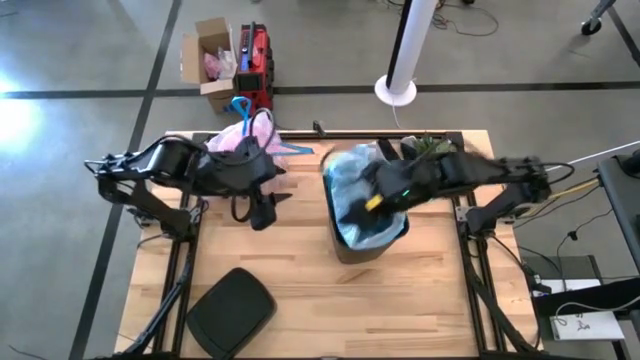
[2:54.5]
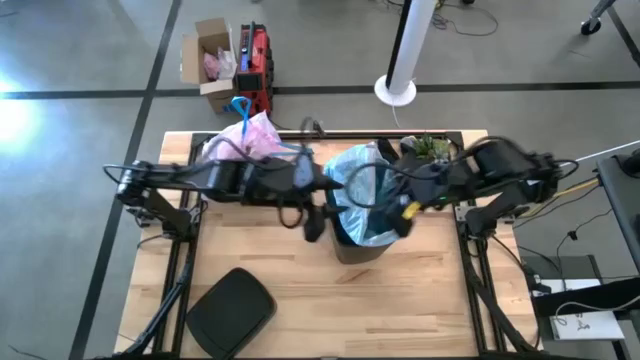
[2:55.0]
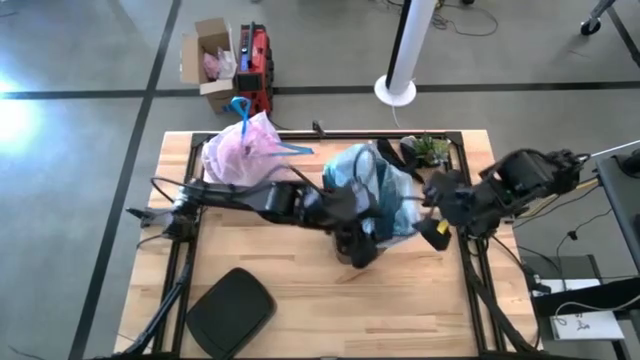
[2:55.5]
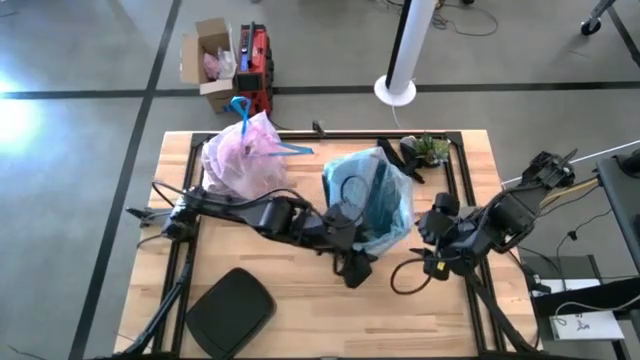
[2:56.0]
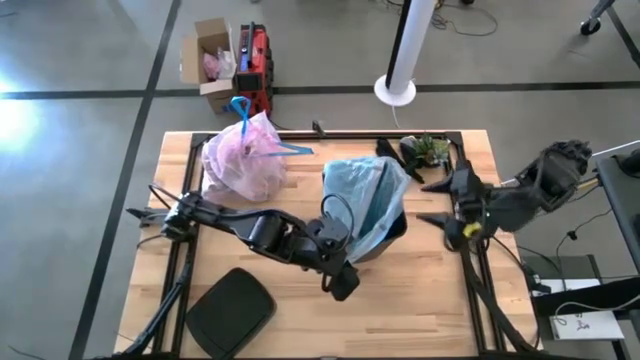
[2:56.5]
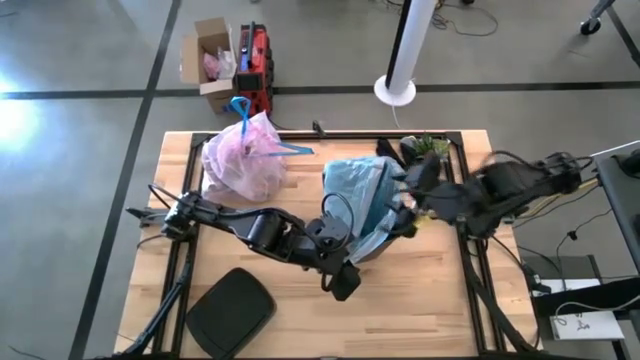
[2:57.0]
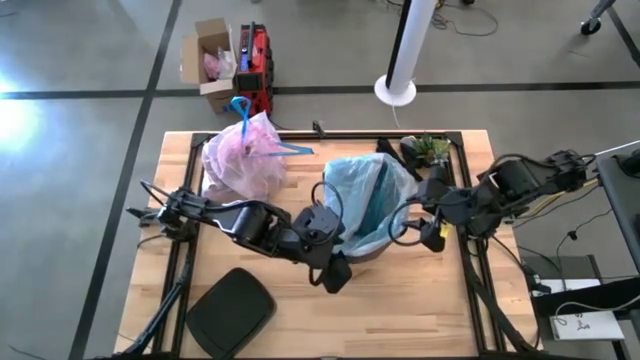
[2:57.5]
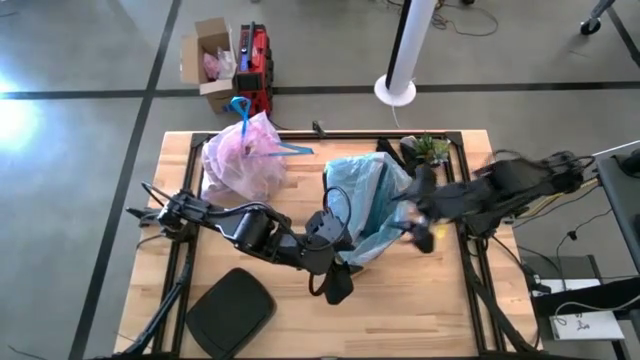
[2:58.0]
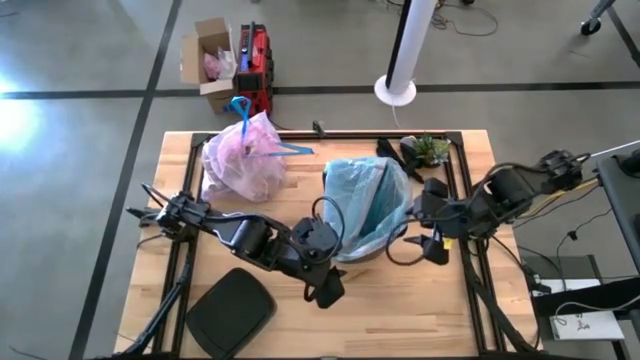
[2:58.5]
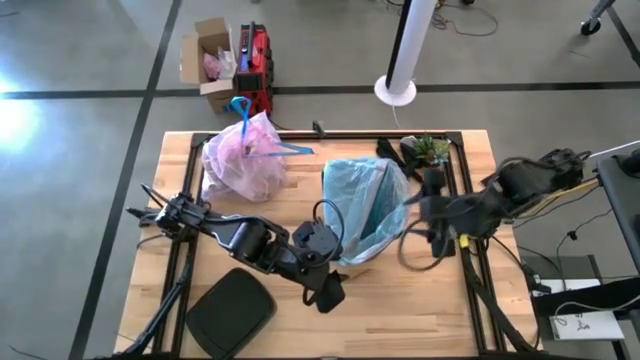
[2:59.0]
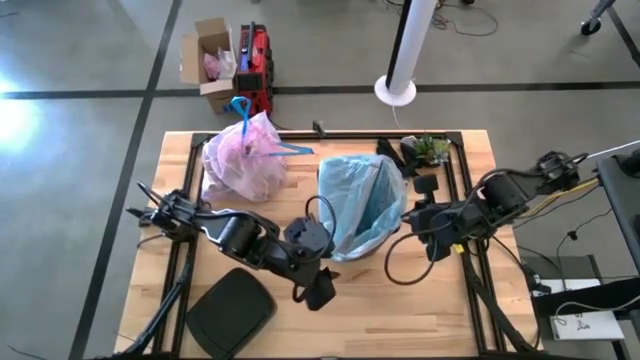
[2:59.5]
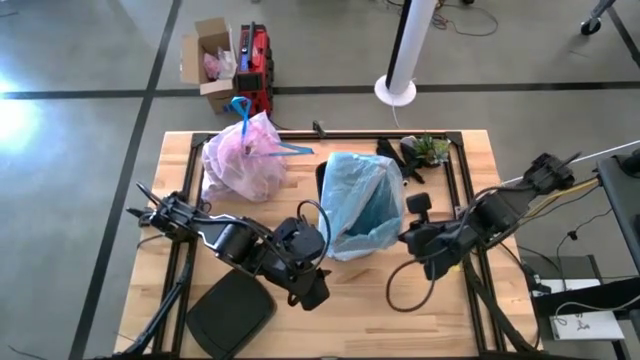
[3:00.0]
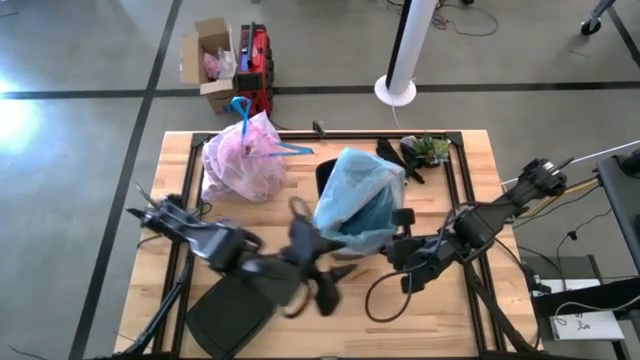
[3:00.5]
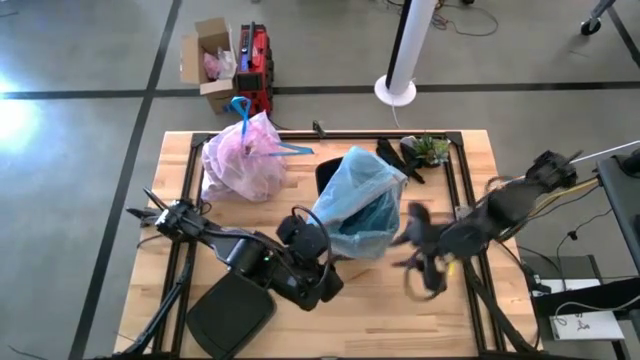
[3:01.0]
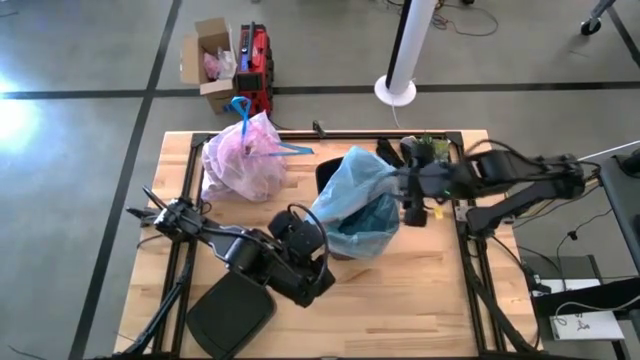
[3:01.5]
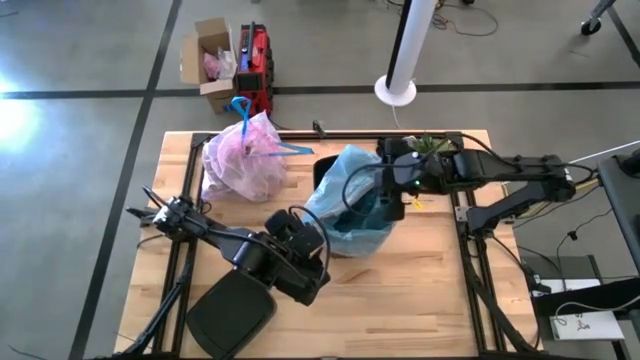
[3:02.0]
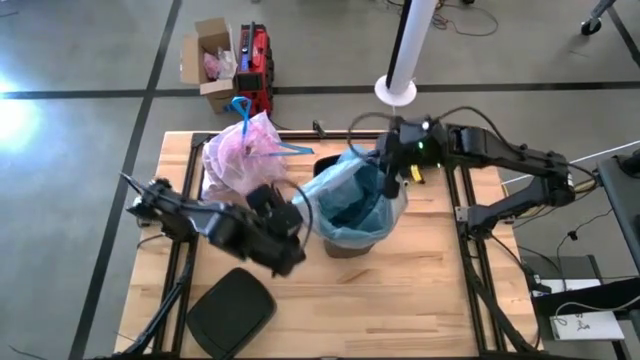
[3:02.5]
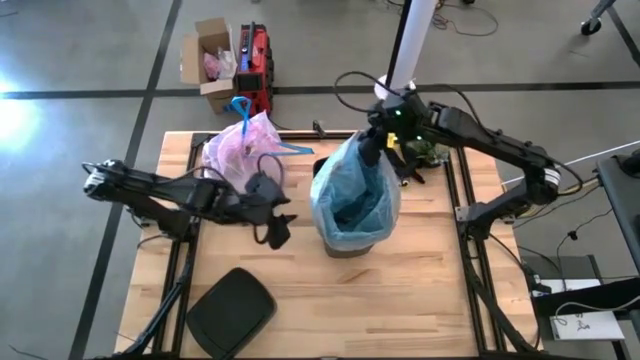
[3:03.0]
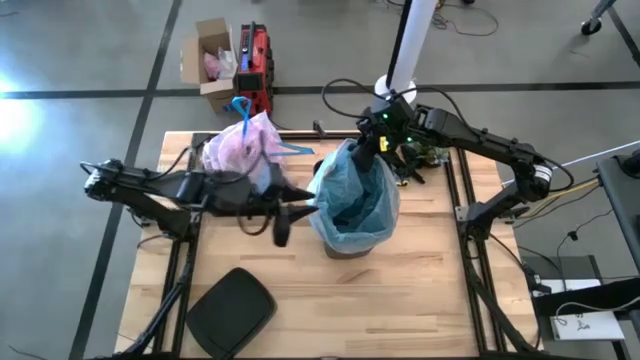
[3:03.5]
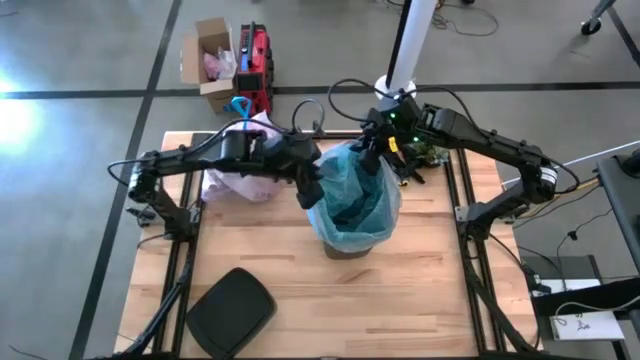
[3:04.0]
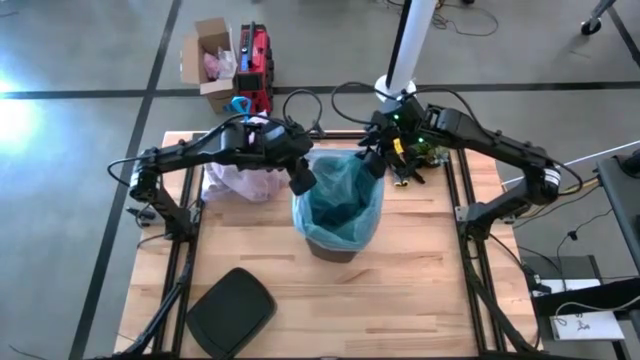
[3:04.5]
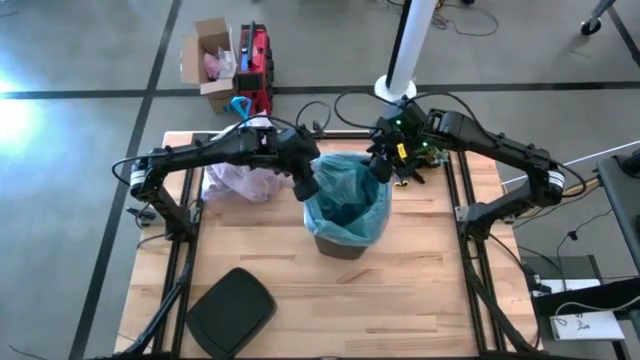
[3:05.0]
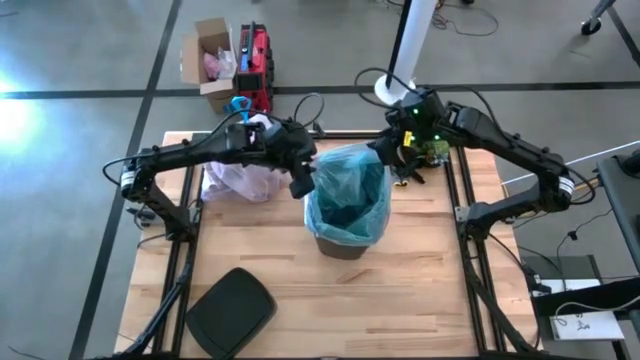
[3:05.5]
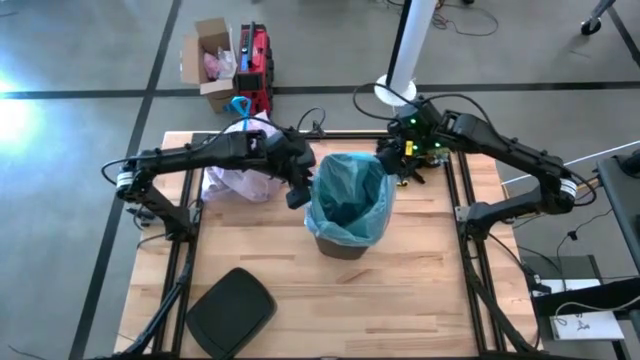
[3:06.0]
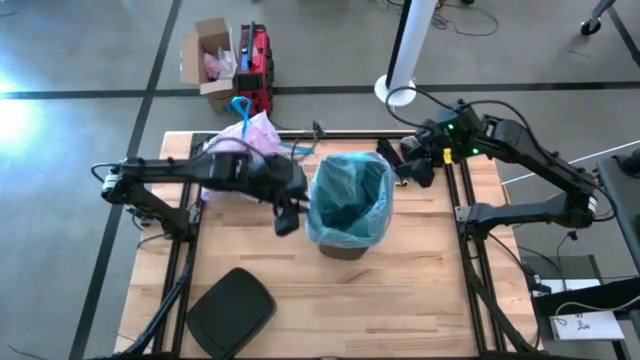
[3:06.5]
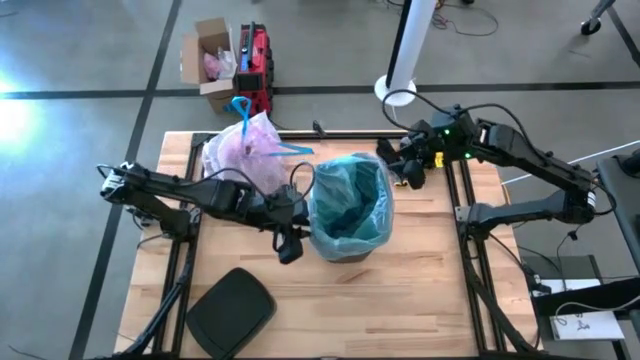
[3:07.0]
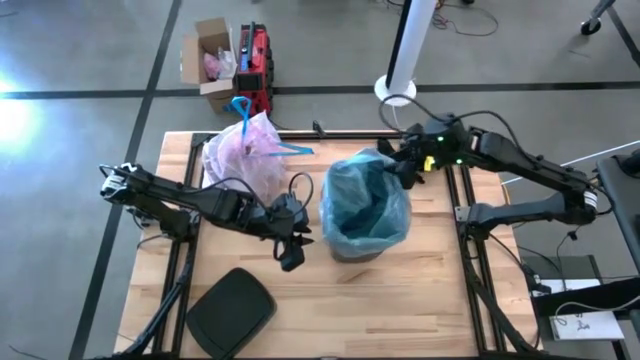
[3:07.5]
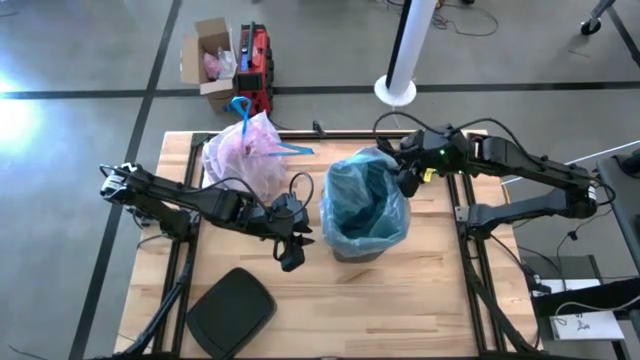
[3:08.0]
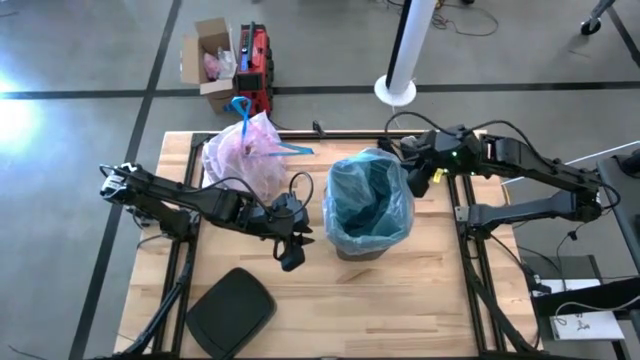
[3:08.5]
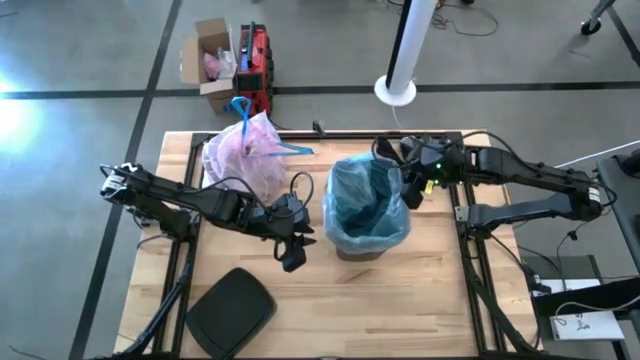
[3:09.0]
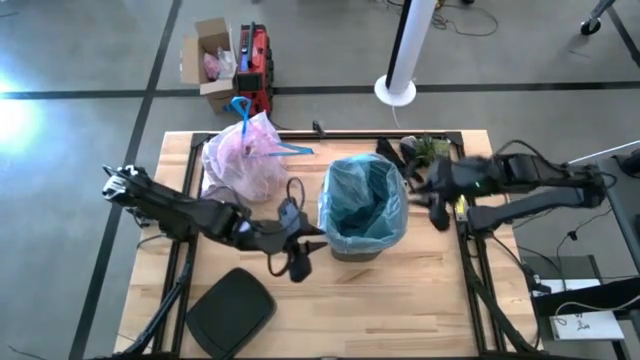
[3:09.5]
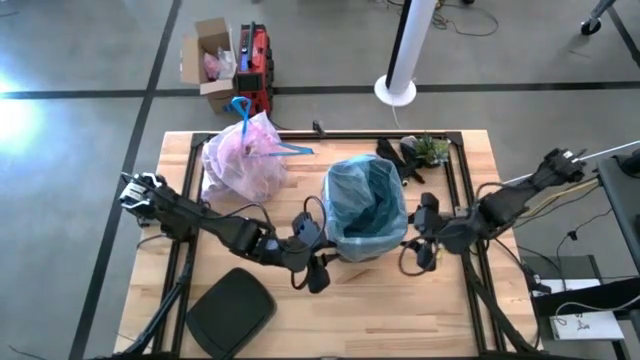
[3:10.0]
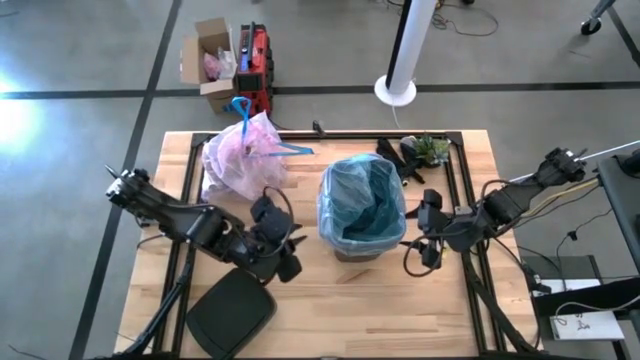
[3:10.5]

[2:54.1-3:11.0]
Task: place trash/remove bag and relplace
Insert the blue trash bag into the trash bin

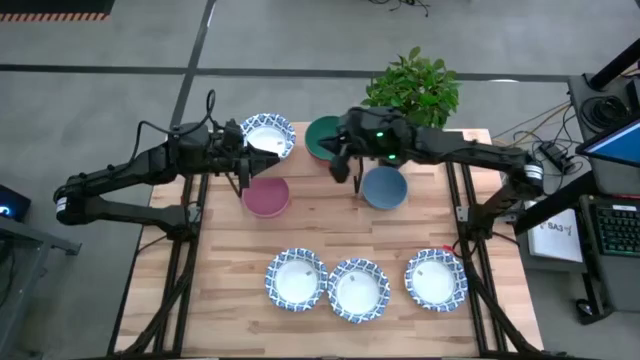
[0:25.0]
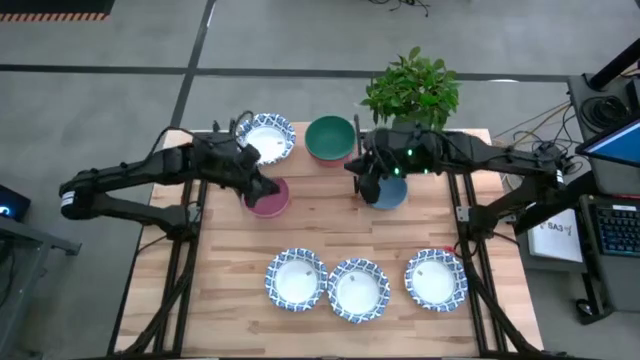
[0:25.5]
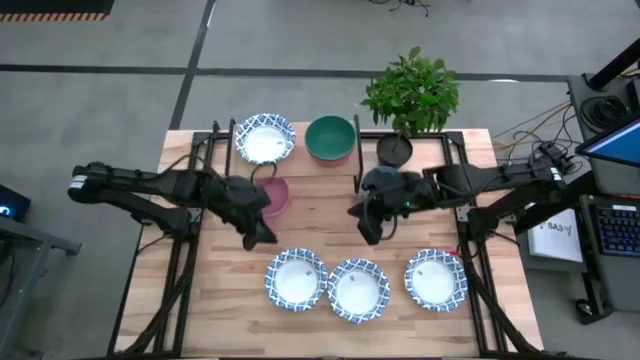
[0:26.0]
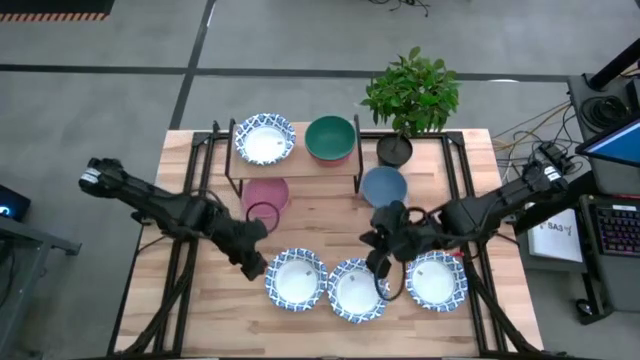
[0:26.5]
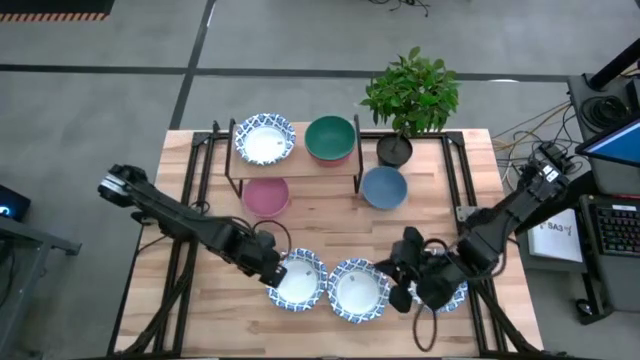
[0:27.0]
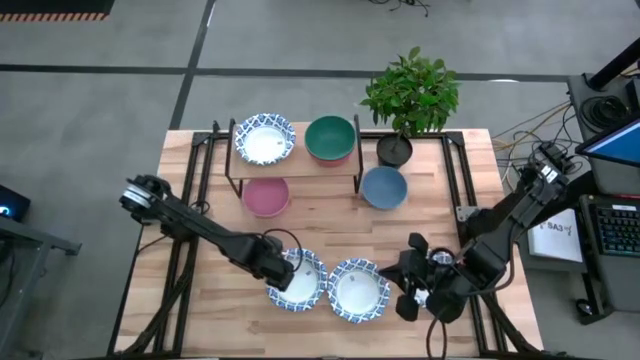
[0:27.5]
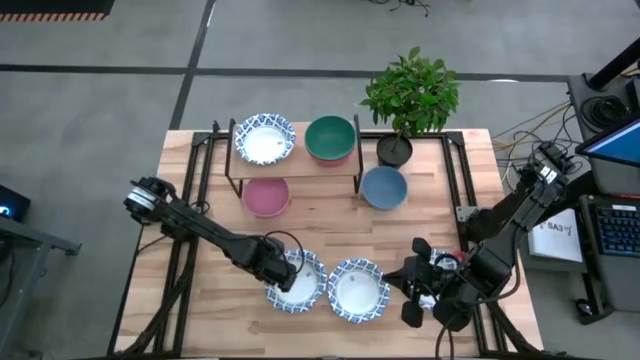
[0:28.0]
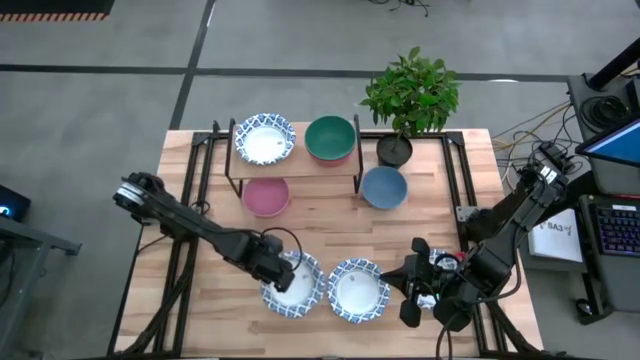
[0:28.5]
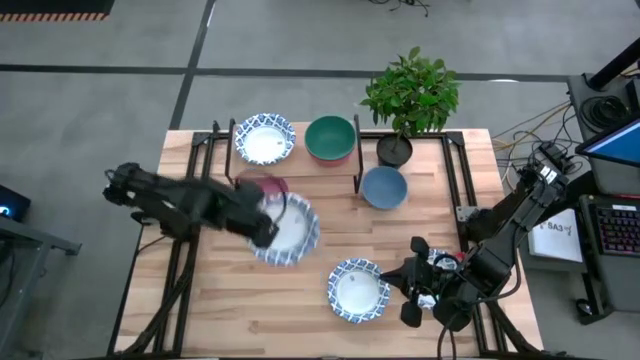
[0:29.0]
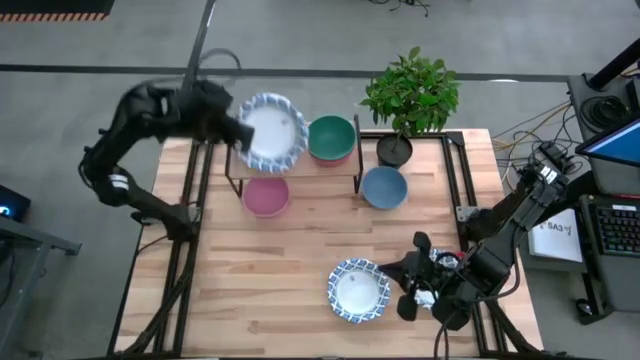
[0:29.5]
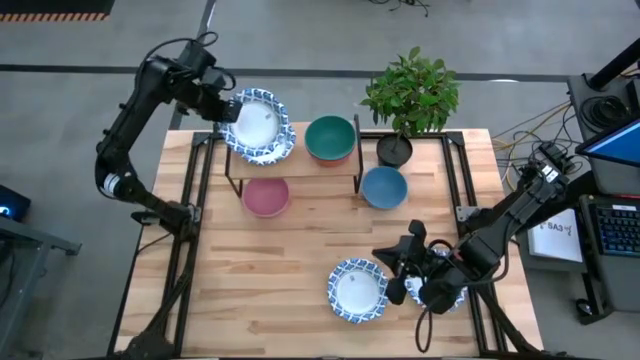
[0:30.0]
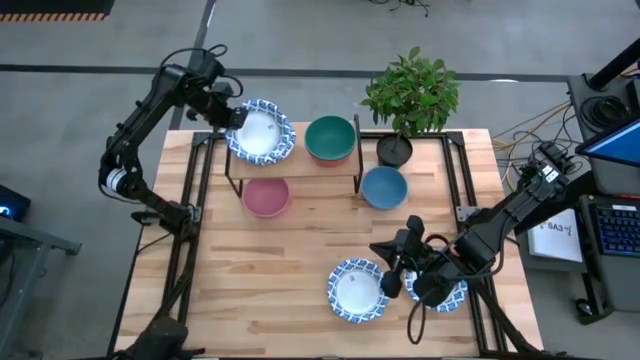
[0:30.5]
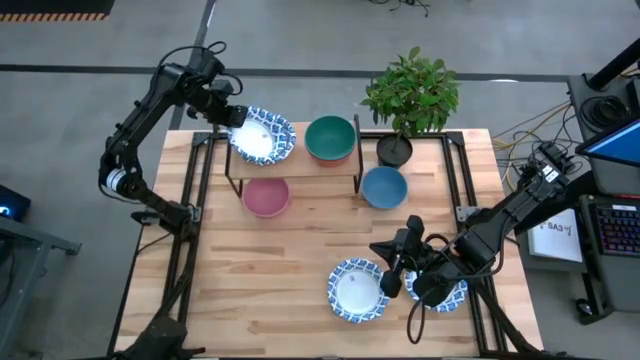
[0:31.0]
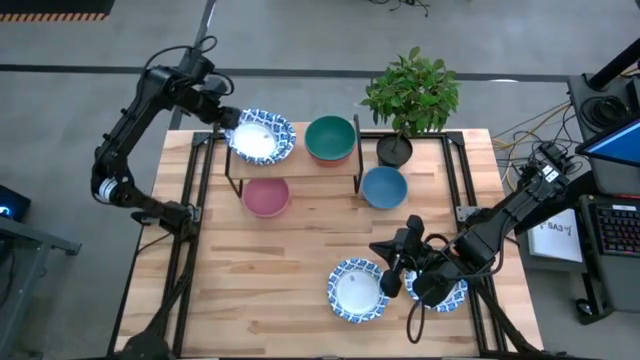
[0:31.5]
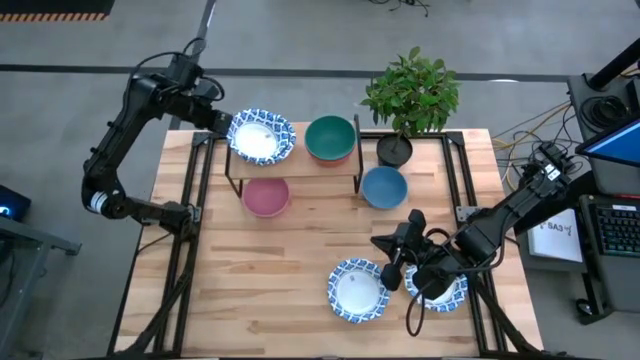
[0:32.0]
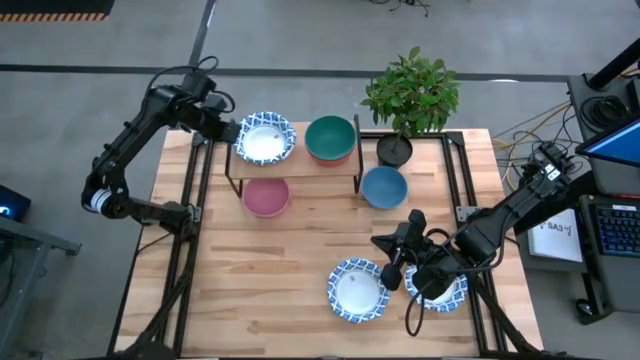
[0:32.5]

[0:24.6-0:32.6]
Task: Place and stack bowls onto a shelf
Stack the white pattern paper bowl on top of the white pattern paper bowl on the shelf
